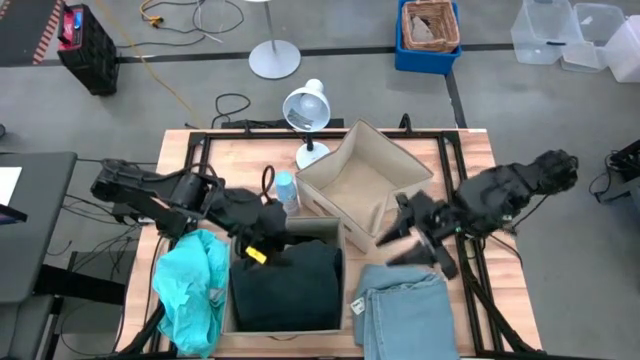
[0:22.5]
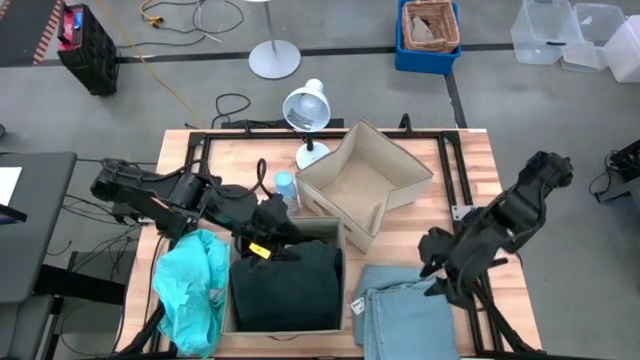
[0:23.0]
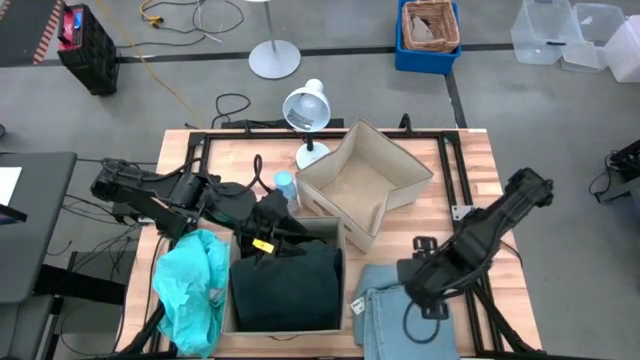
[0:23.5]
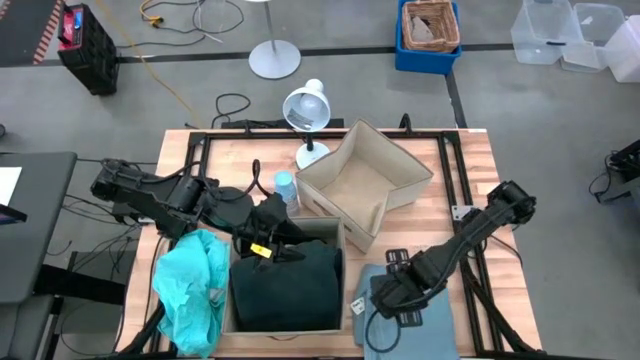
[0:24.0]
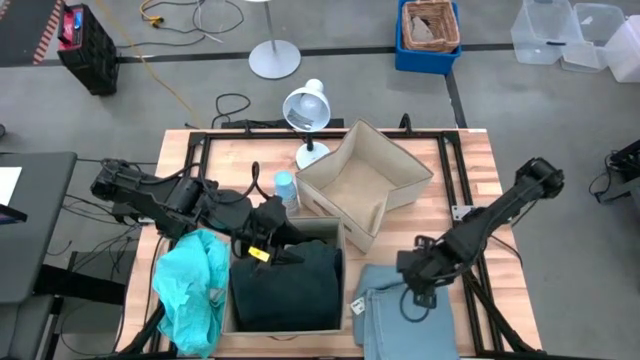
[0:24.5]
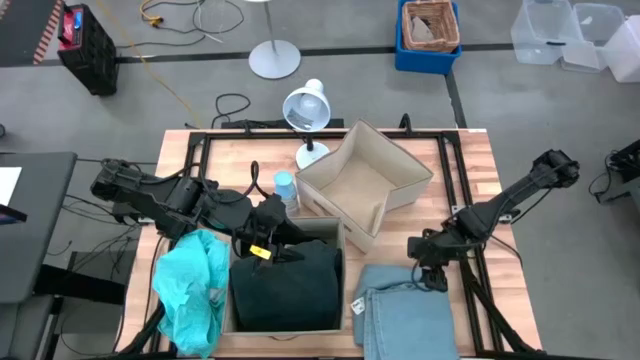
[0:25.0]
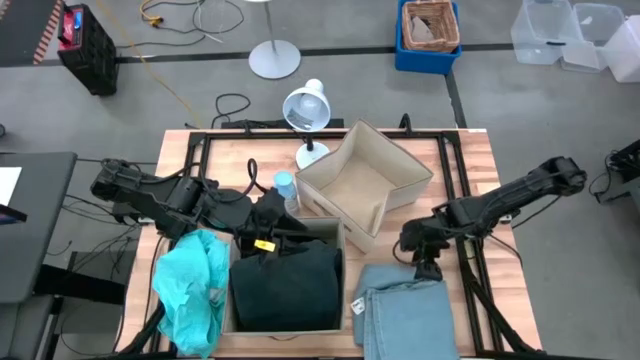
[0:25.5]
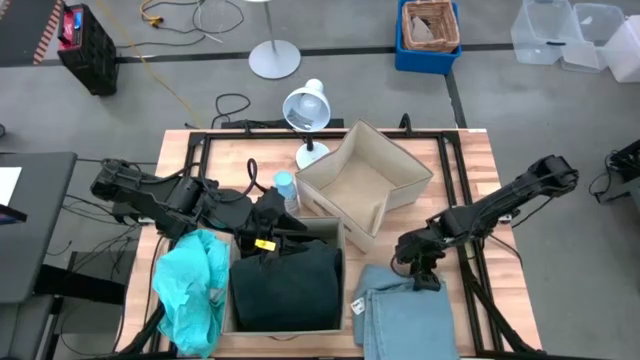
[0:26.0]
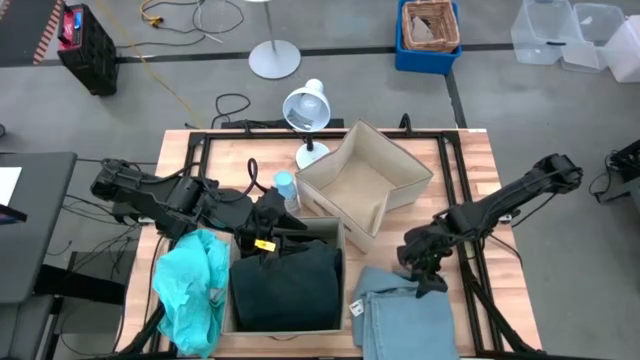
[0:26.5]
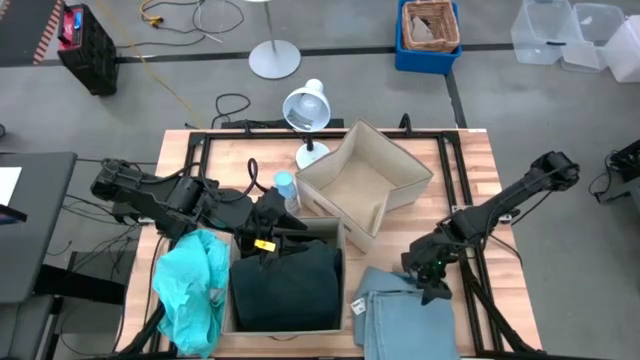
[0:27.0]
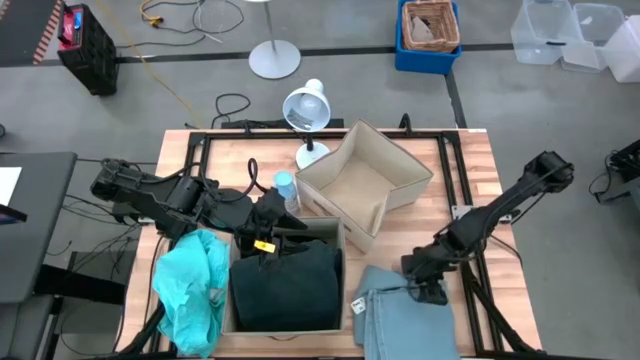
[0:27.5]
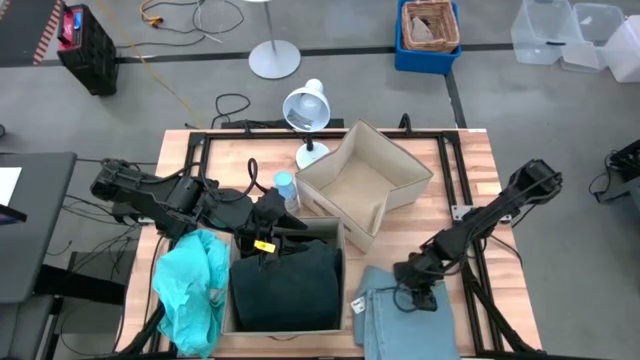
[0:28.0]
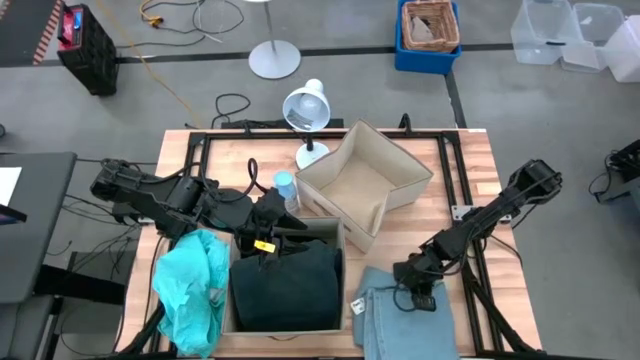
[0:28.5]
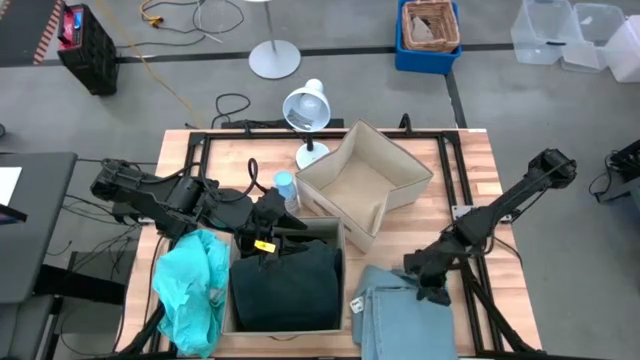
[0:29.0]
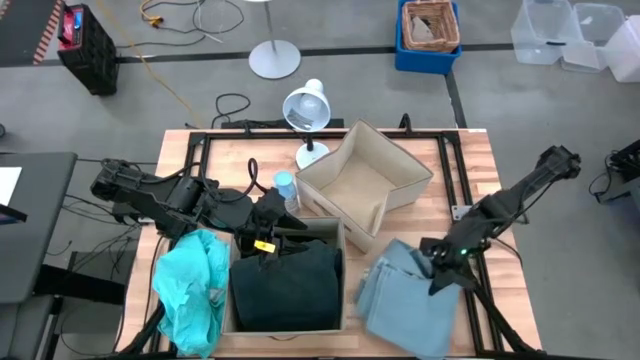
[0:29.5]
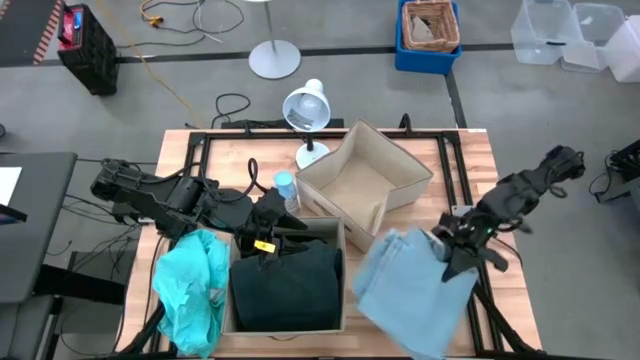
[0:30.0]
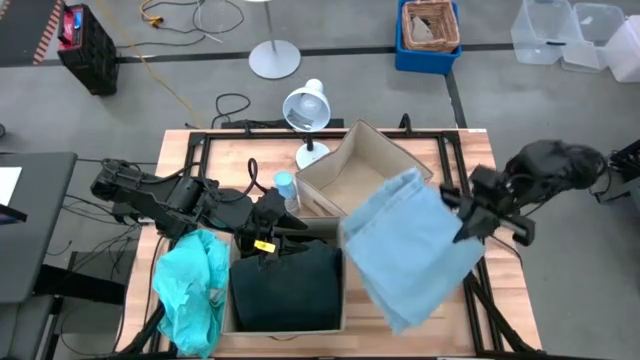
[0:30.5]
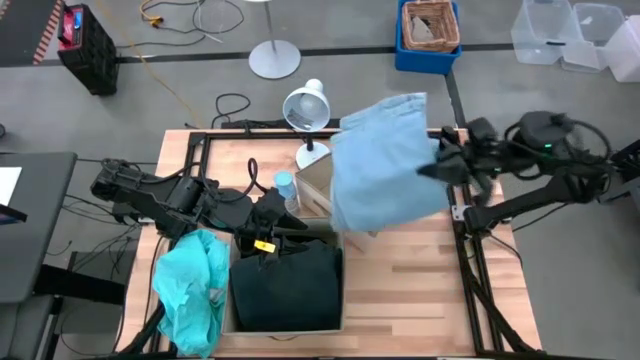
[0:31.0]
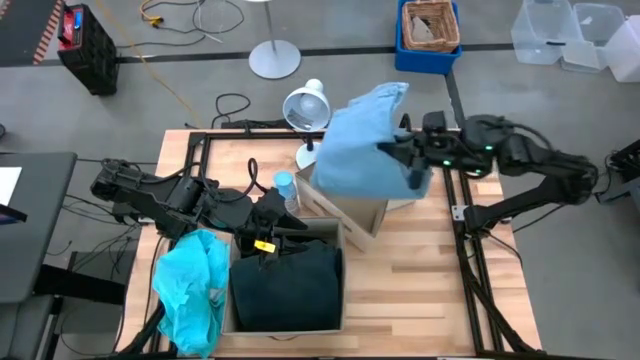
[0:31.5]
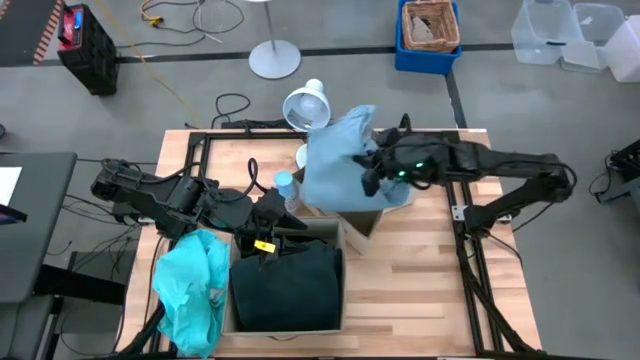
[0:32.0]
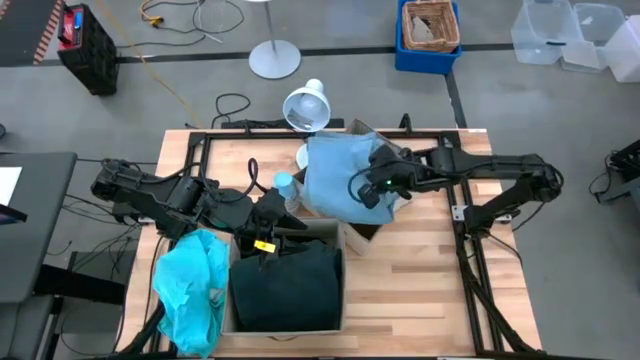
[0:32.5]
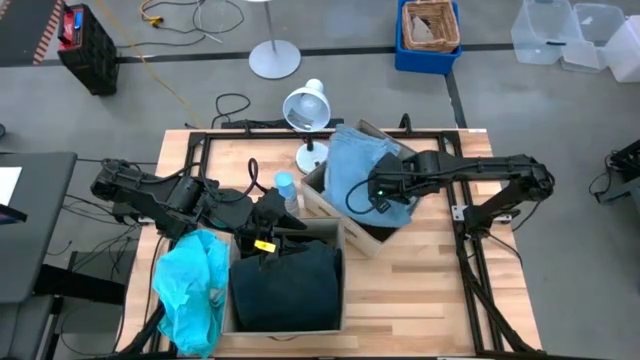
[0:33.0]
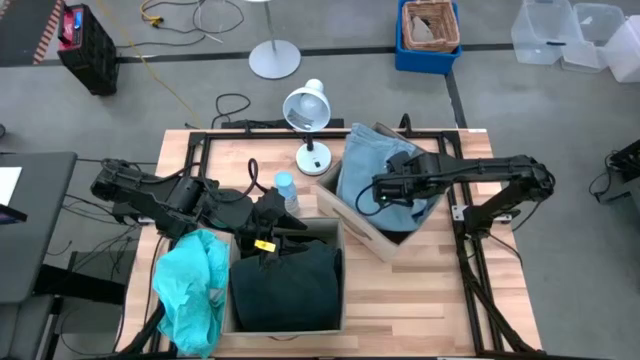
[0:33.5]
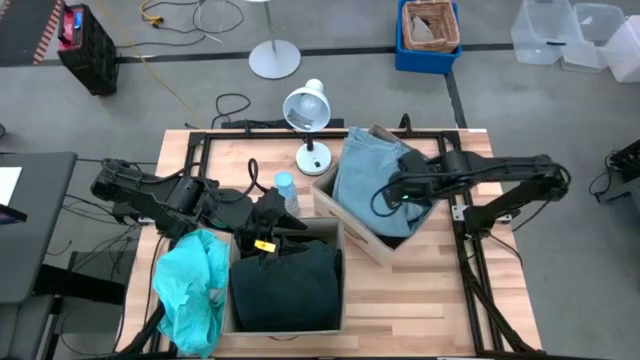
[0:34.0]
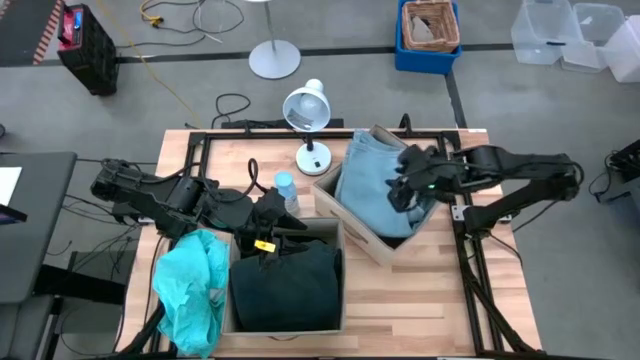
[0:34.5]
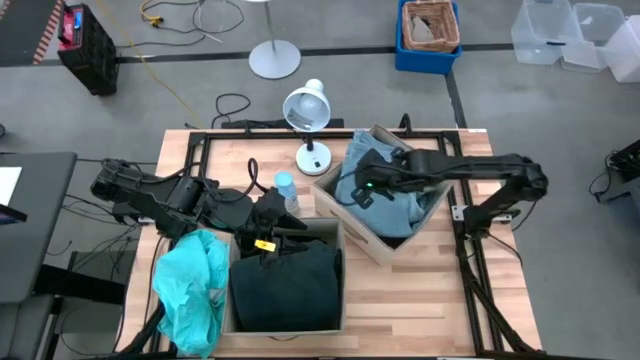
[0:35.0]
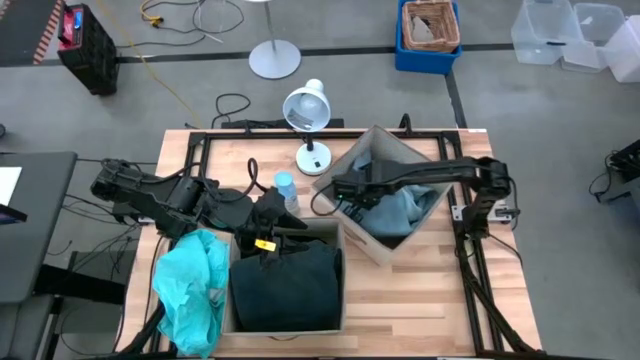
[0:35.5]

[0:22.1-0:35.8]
Task: Sort clothes
Put the light blue jeans into the top laundry bin

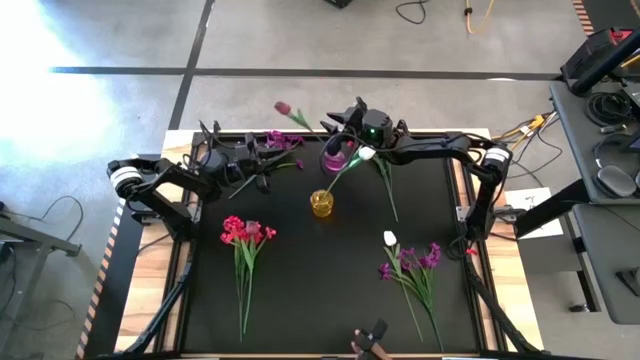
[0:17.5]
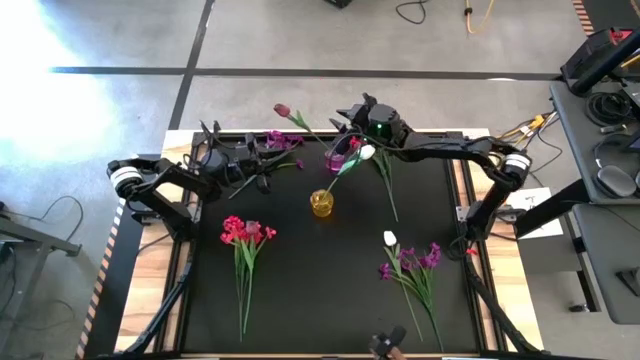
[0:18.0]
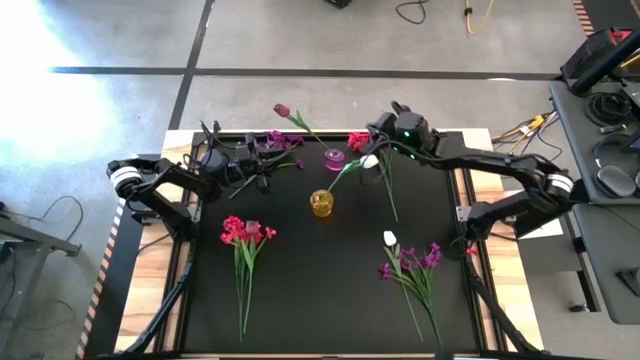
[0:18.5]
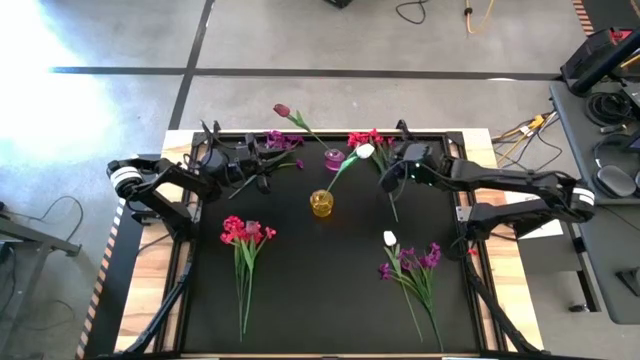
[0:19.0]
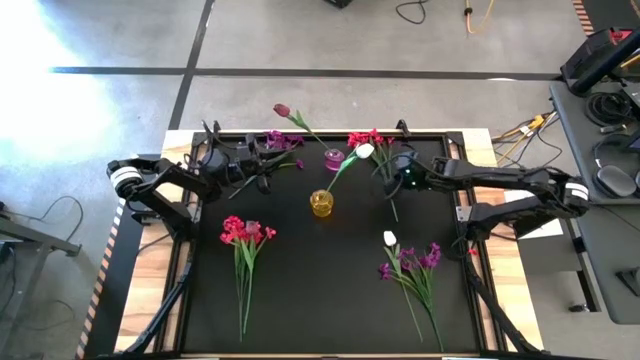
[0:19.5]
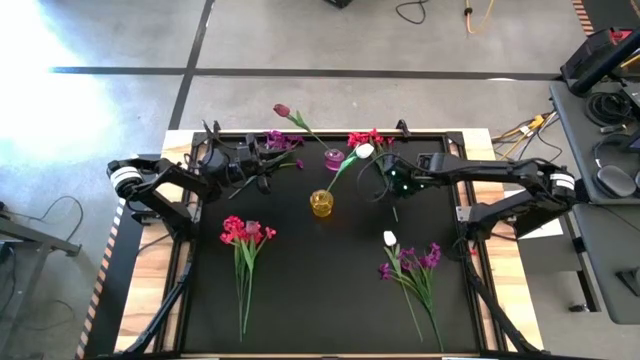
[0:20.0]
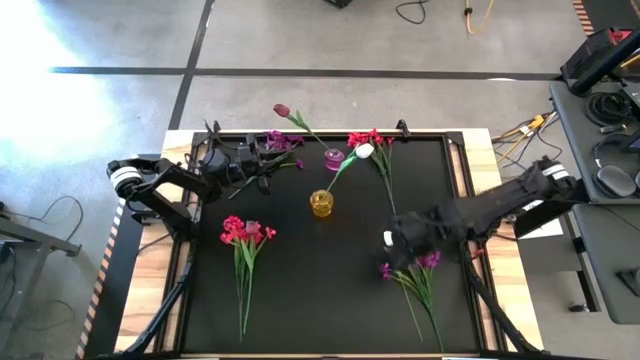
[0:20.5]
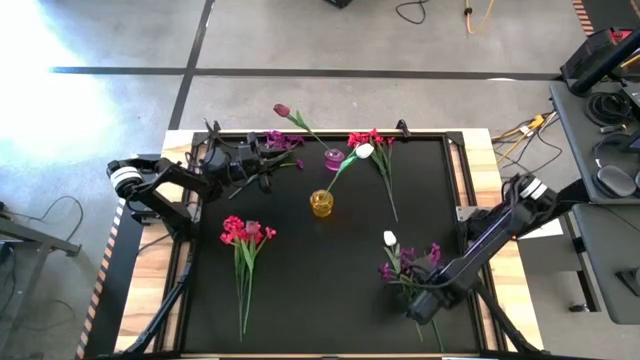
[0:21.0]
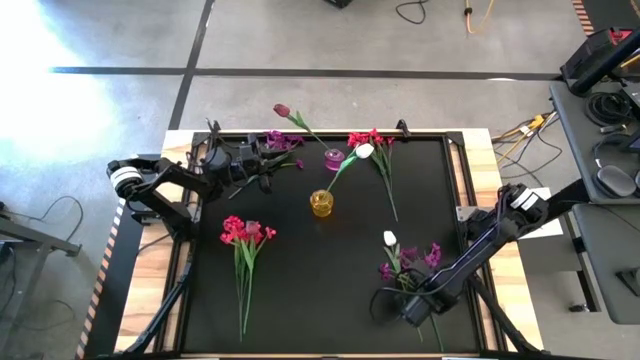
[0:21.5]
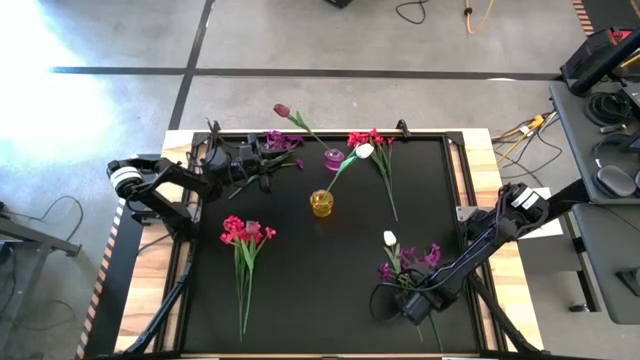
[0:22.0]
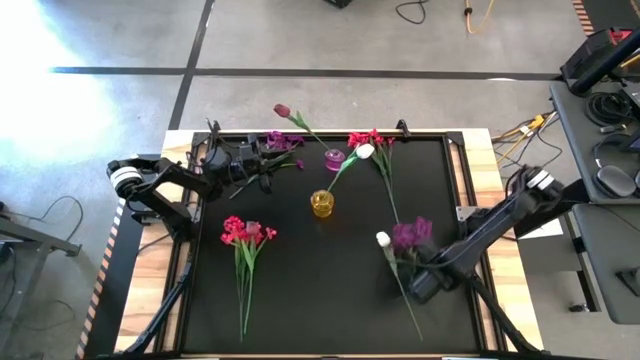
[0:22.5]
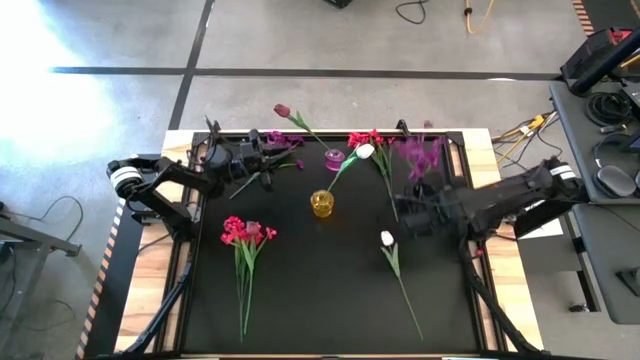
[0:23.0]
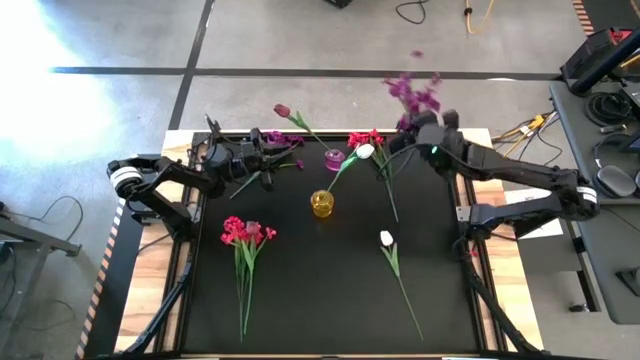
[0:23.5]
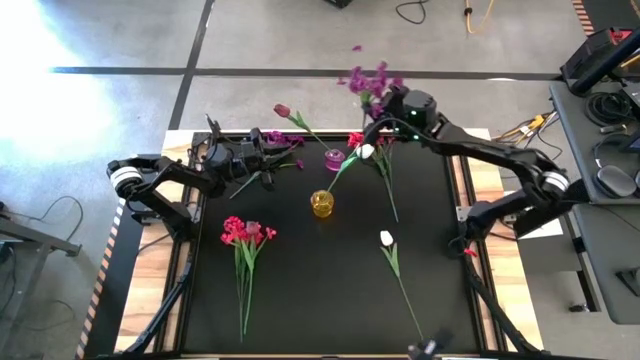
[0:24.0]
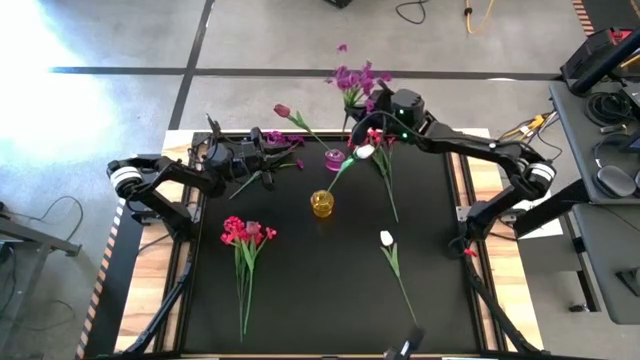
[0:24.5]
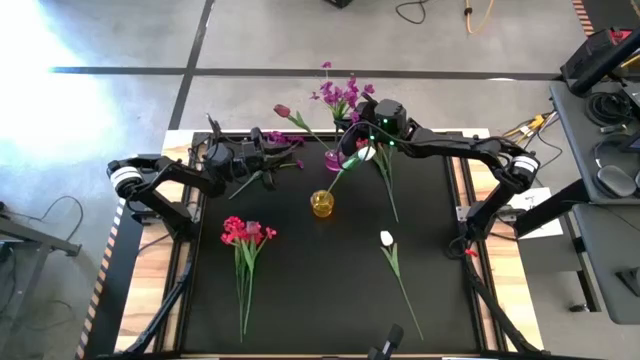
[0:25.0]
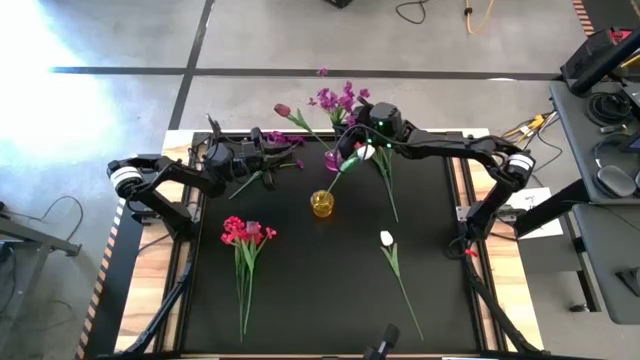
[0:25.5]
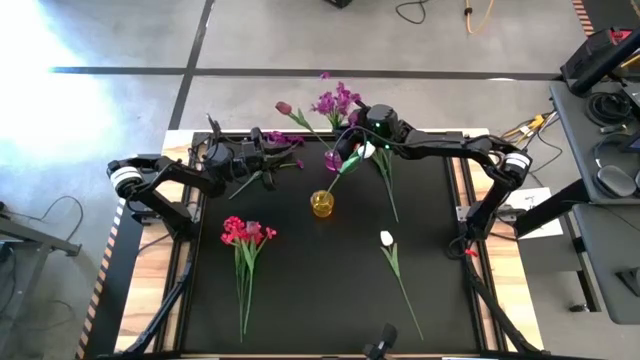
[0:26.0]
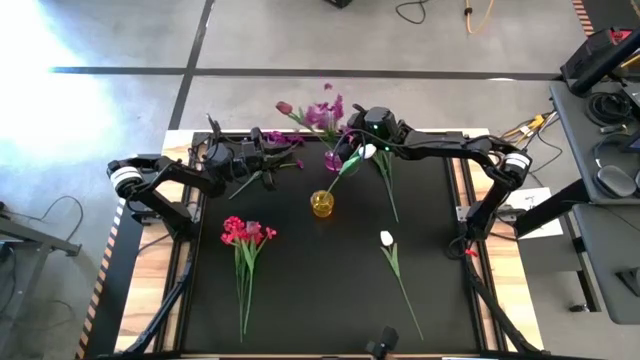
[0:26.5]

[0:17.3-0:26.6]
Task: Sort flowers into vase by color
Put the bottom purple flowers into the violet vase
